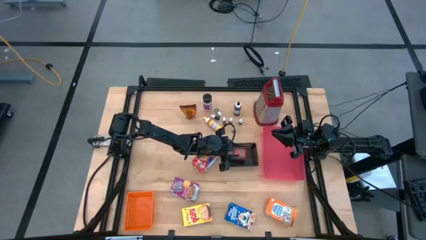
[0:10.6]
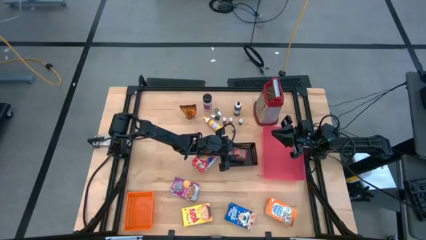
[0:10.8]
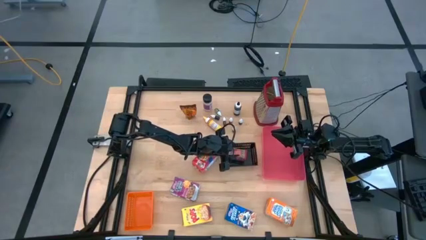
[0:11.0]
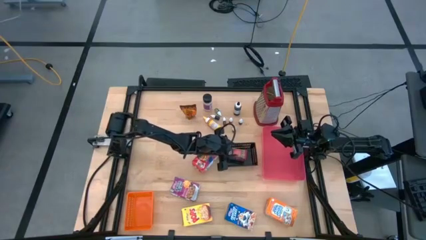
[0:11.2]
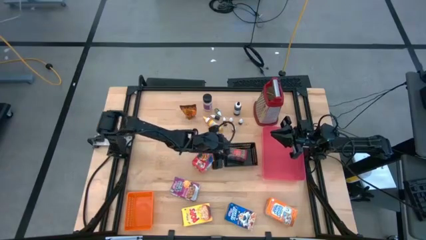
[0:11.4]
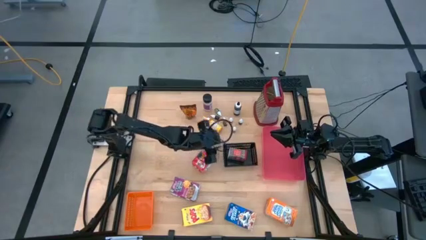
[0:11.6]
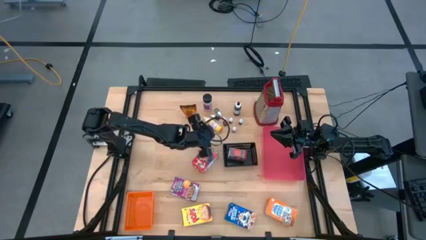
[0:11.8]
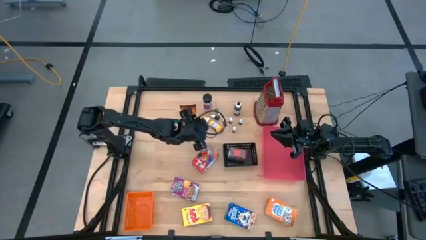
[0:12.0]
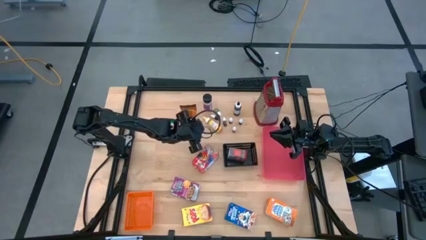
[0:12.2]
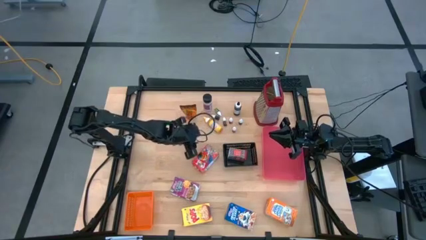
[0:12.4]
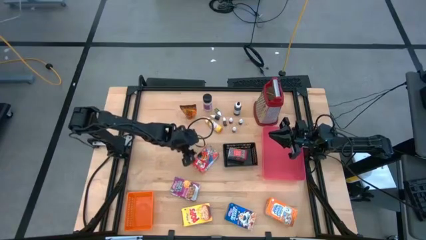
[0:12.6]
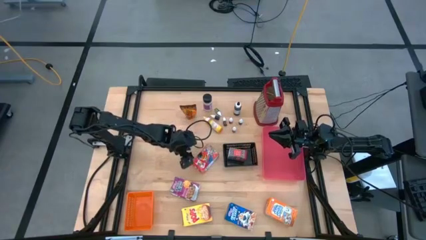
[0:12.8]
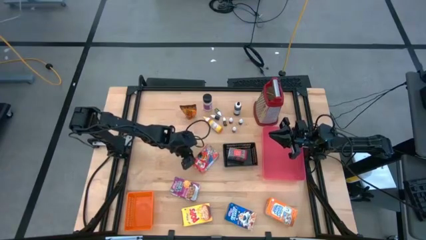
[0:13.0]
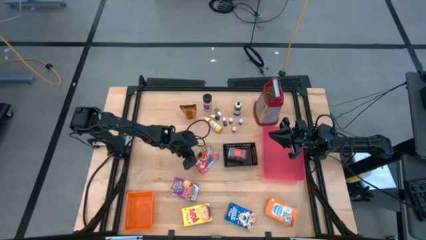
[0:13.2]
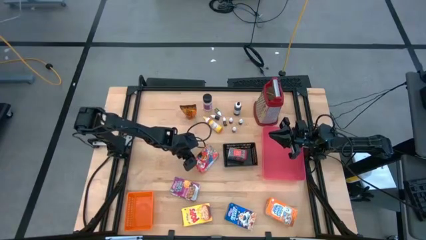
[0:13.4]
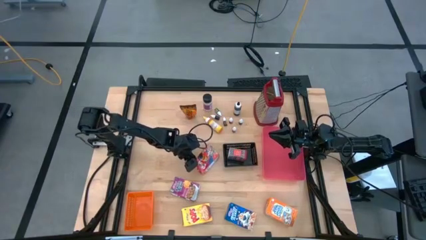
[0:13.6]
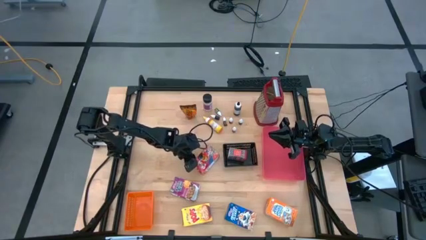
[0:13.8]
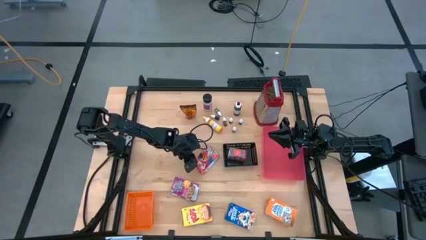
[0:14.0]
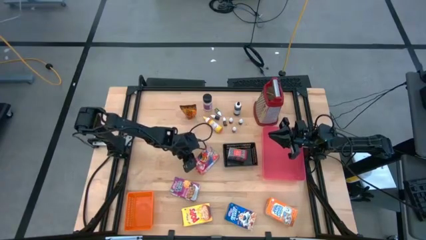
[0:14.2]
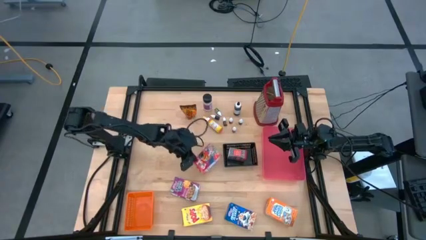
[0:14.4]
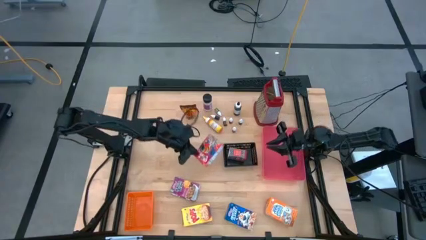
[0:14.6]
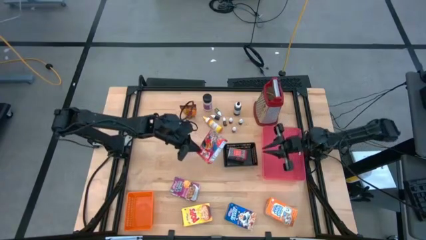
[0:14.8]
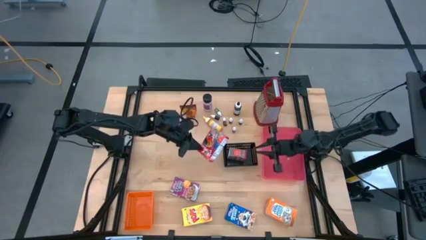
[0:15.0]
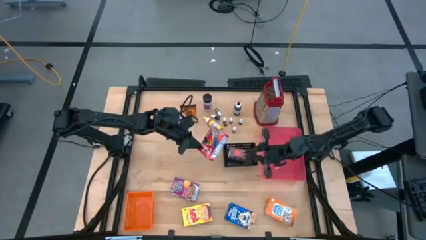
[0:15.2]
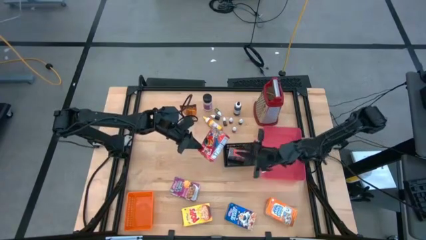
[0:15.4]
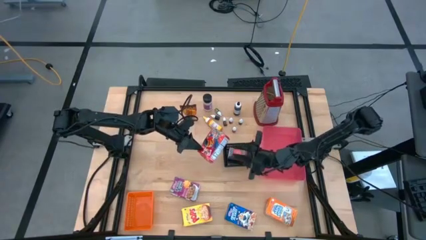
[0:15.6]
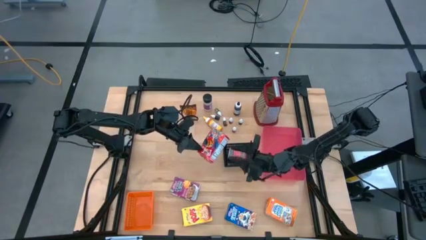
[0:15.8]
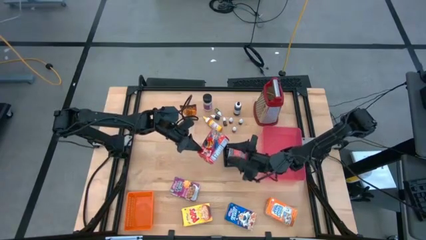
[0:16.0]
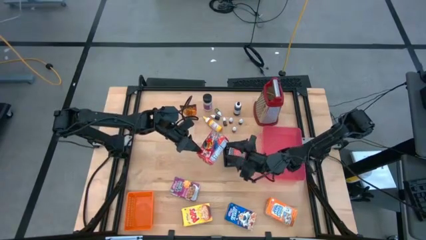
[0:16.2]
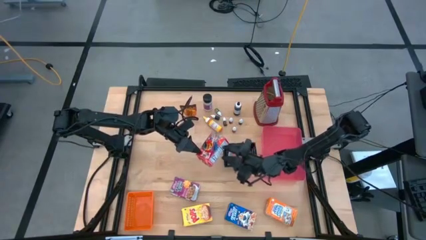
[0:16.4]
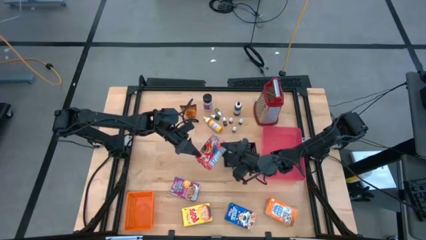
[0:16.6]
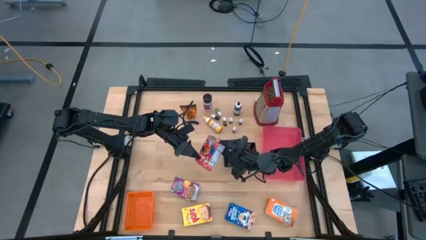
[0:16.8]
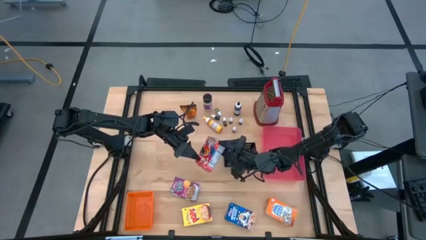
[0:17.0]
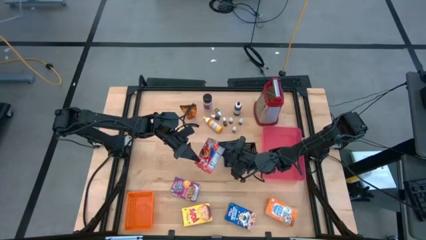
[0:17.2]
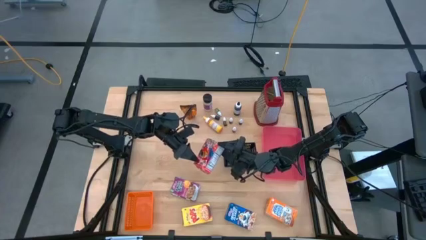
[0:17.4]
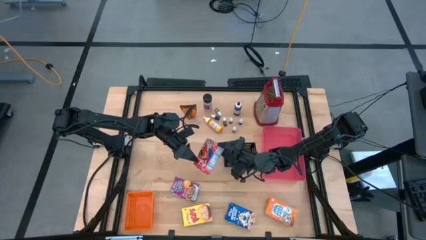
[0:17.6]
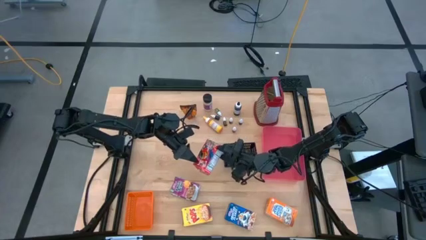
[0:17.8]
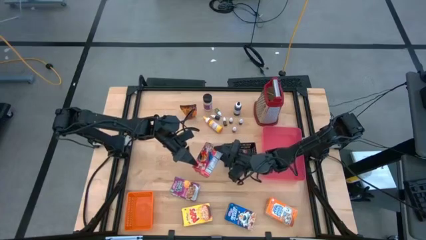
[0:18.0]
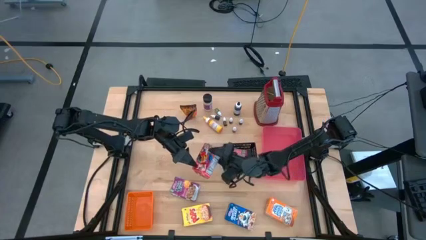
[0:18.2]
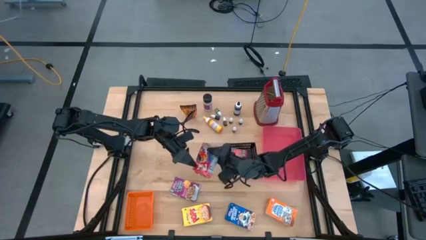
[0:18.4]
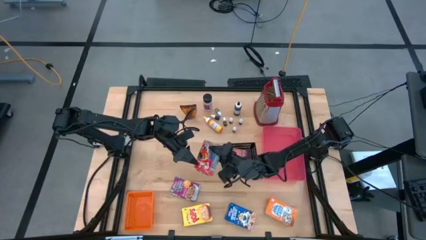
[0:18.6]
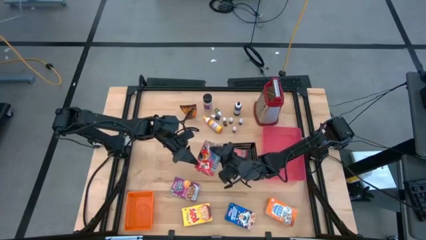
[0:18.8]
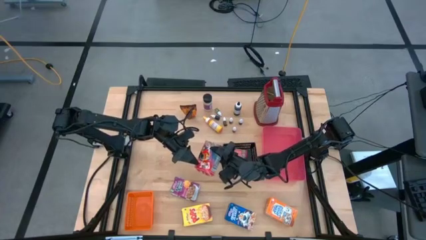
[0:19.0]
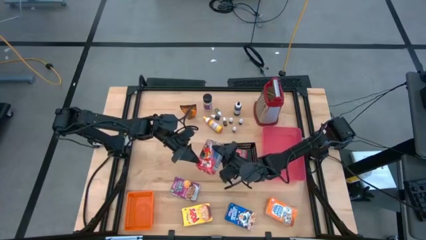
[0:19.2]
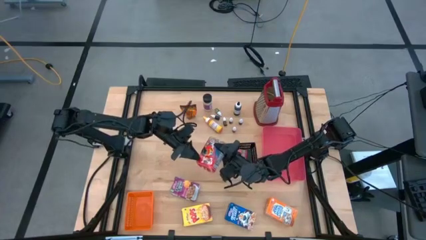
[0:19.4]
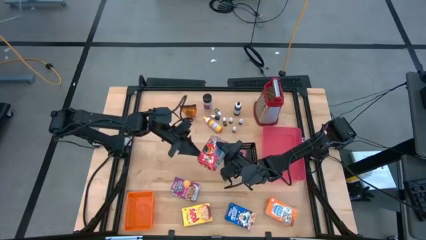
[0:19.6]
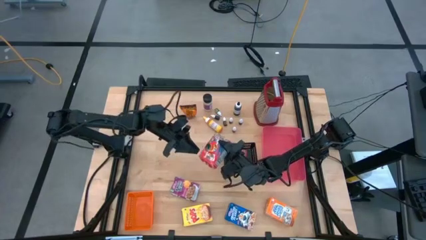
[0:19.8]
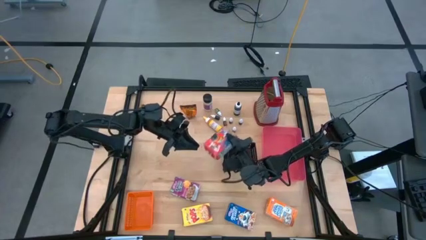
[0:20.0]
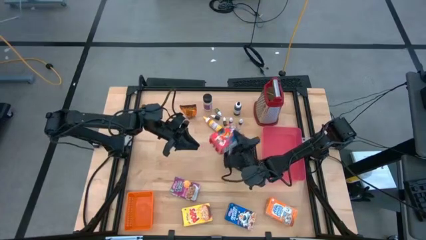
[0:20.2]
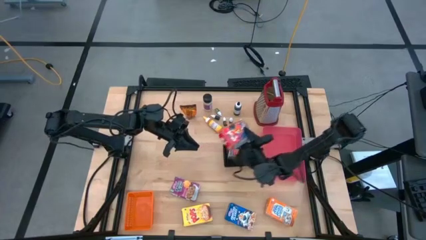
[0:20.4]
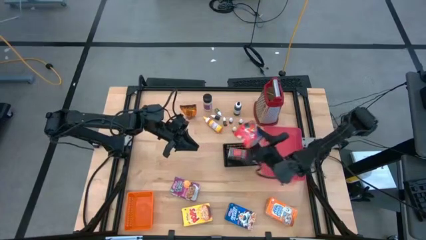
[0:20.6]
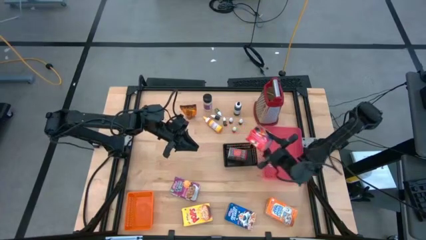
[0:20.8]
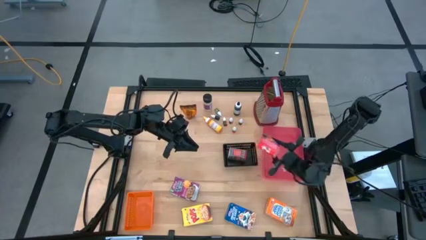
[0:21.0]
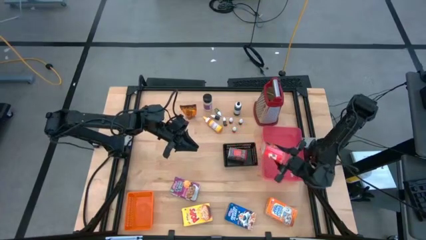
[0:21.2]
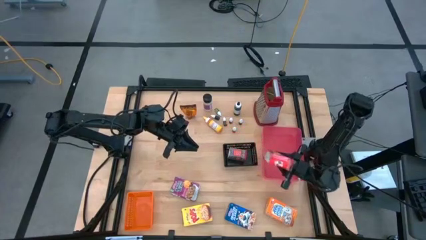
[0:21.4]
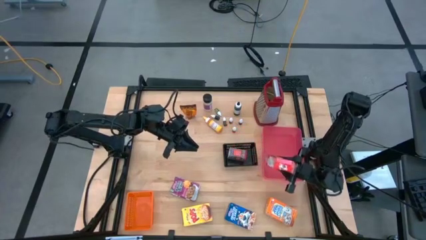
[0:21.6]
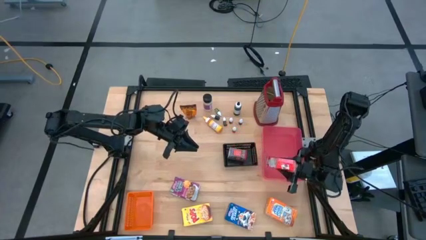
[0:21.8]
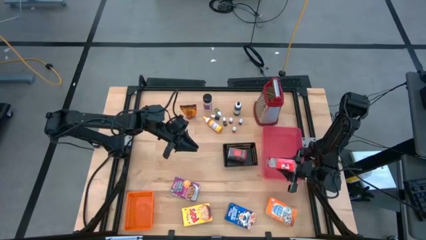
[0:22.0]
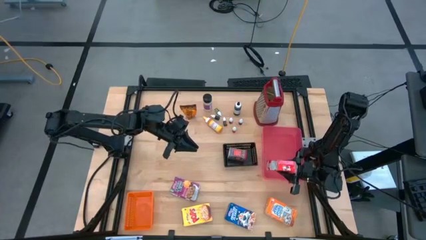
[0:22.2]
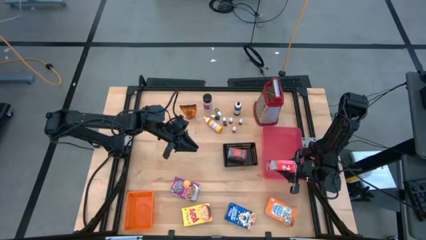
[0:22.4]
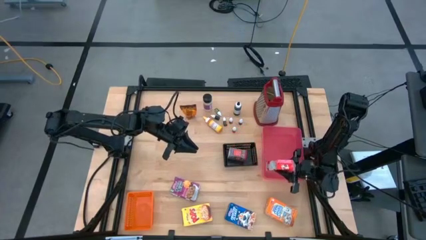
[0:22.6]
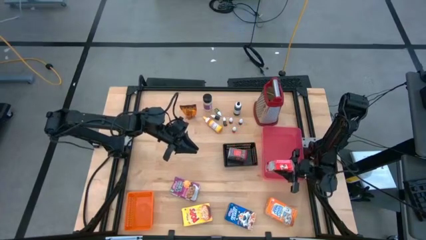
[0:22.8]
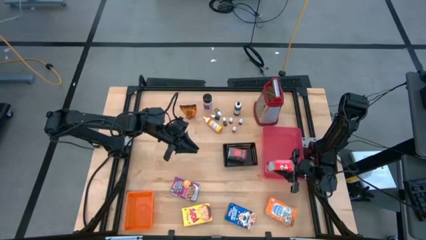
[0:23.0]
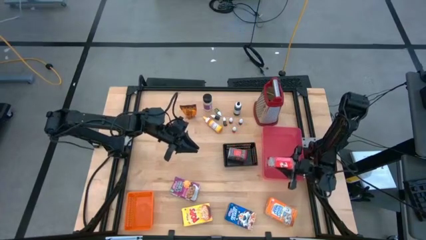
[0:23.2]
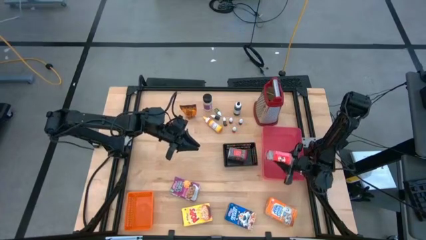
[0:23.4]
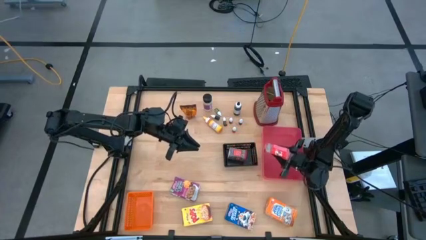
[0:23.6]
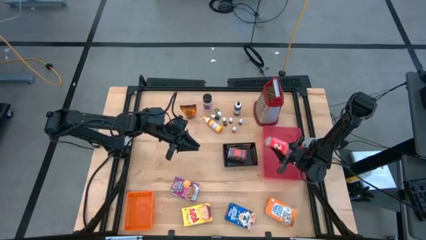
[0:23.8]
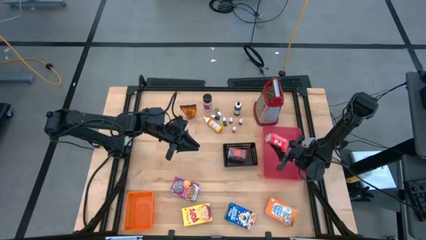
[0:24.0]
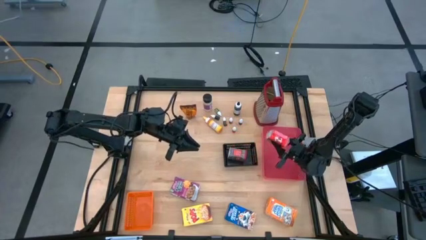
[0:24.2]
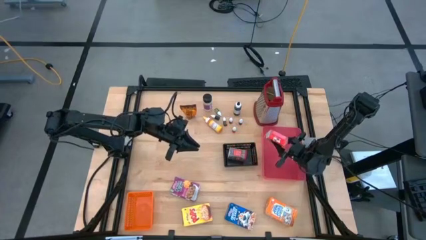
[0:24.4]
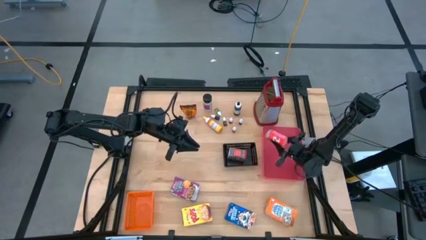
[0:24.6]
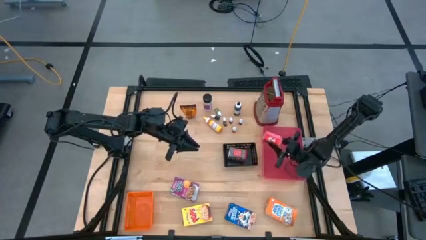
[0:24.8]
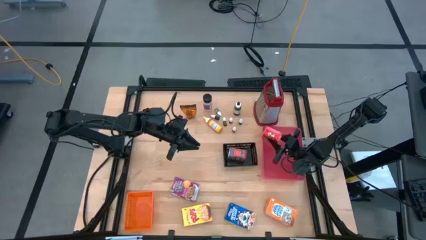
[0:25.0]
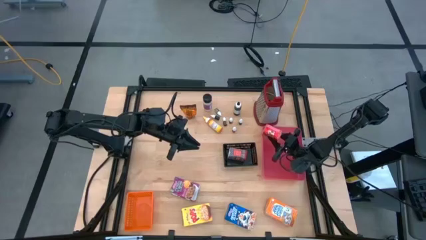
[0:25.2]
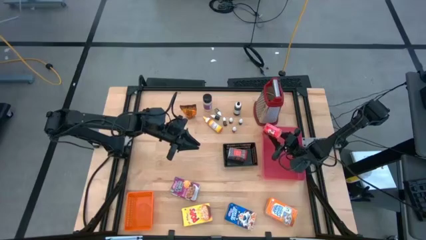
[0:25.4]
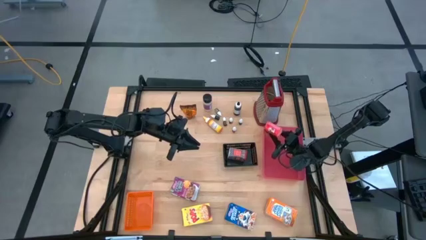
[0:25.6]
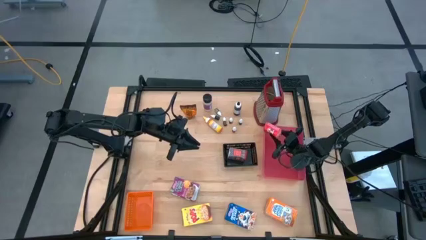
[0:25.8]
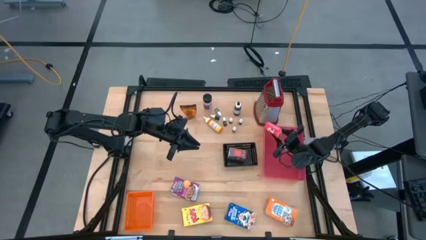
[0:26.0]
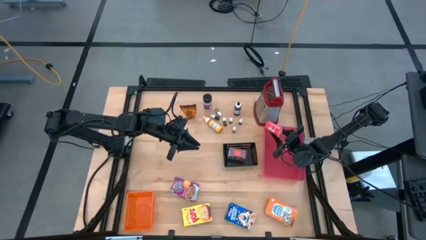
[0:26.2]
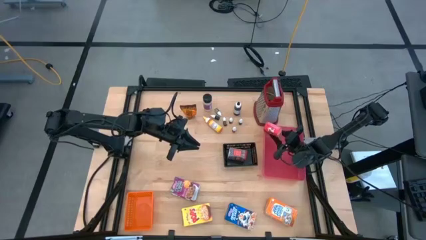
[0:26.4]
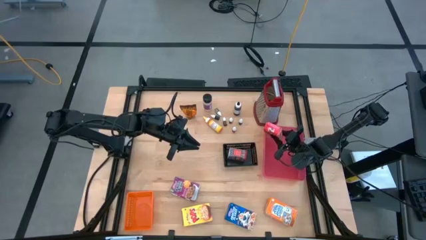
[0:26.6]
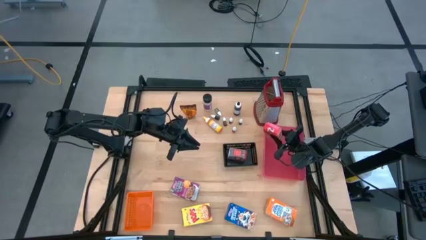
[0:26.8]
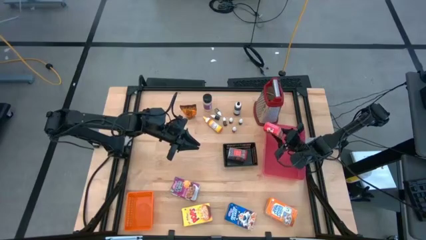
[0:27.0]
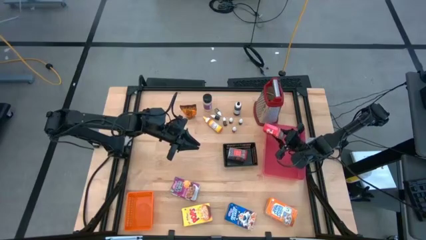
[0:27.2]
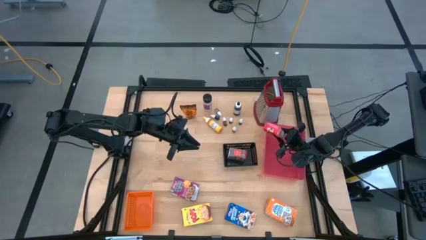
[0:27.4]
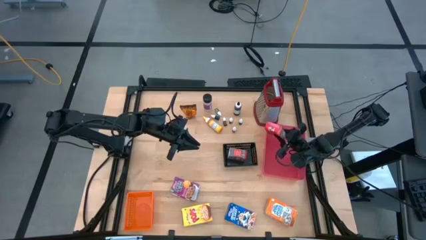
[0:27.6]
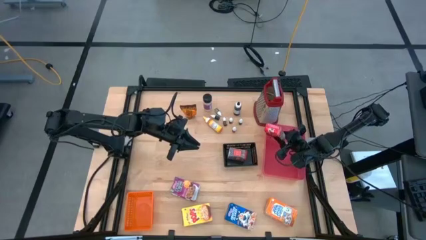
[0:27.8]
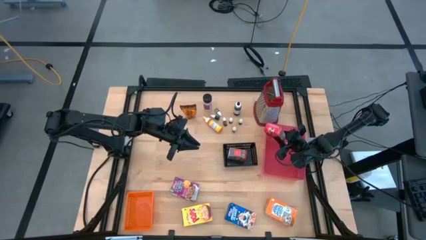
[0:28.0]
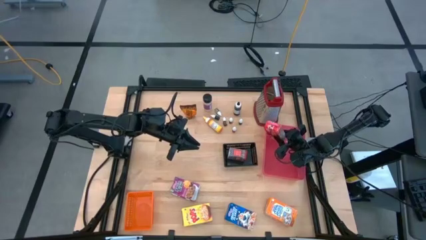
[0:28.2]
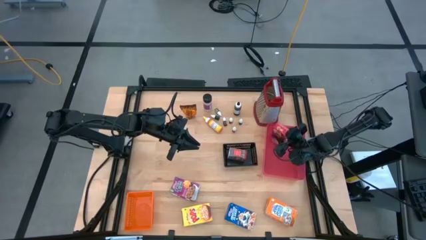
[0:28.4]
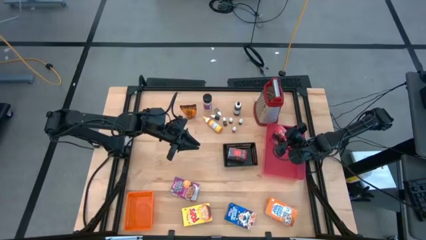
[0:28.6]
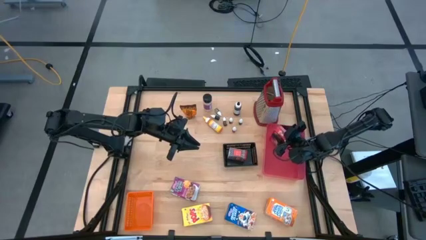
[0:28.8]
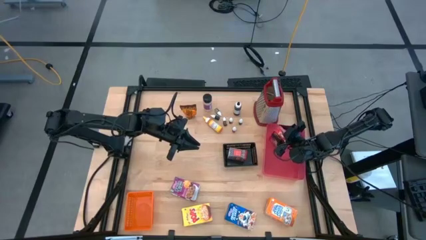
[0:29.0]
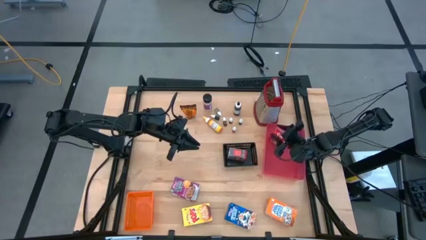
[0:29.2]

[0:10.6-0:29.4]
Task: Pick & Place Kitchen Items
Put the red cereal box into the red bin
